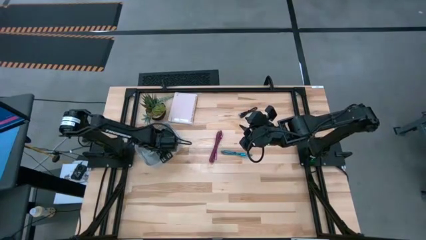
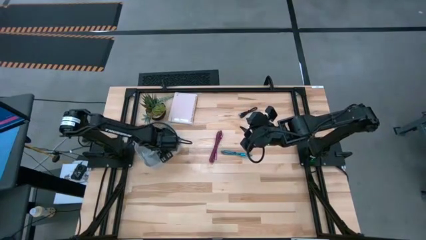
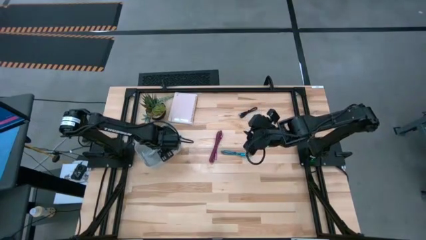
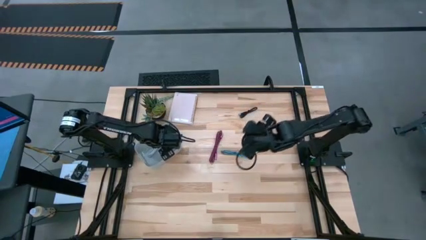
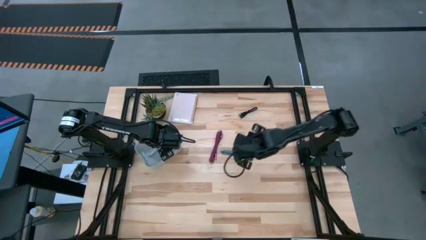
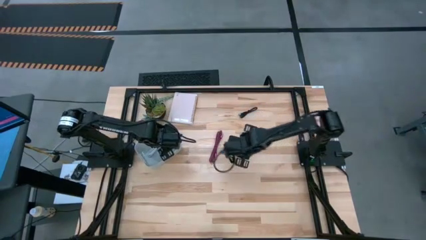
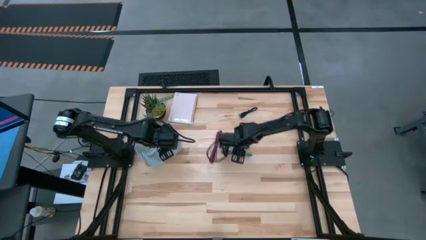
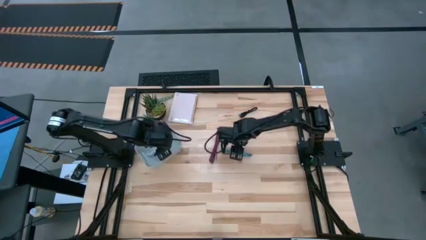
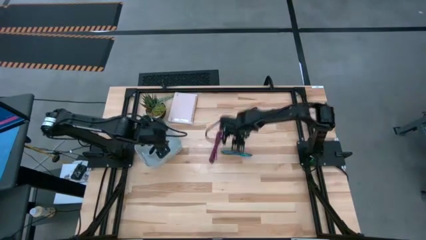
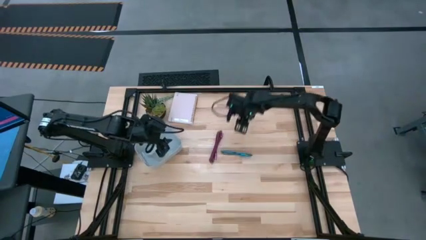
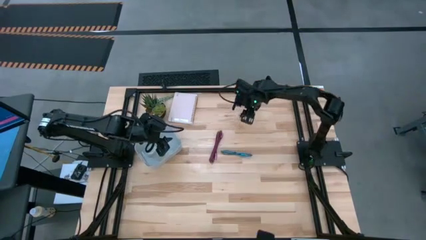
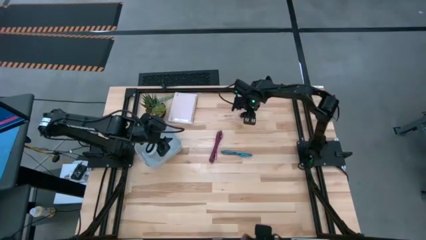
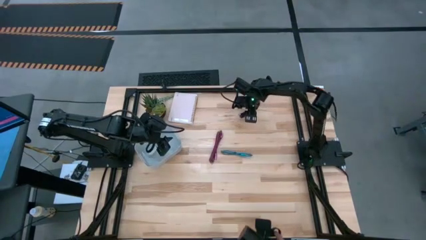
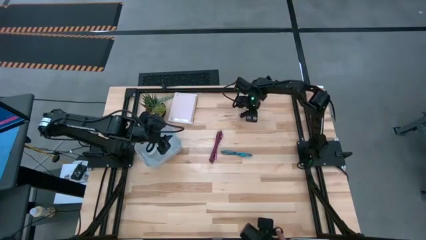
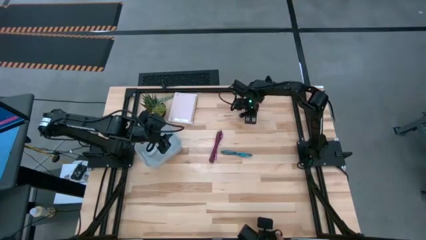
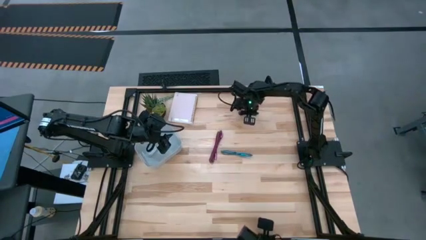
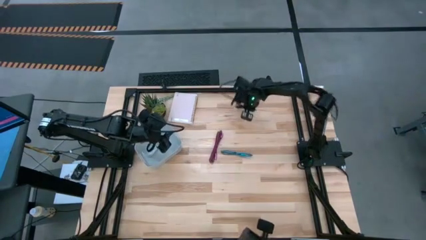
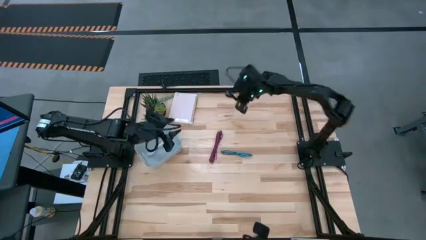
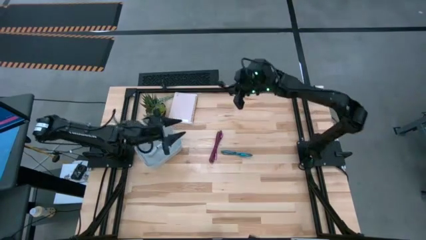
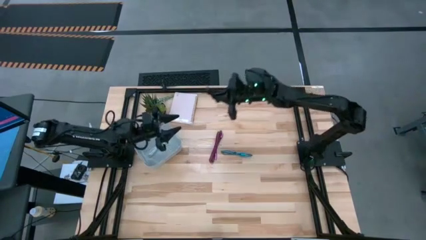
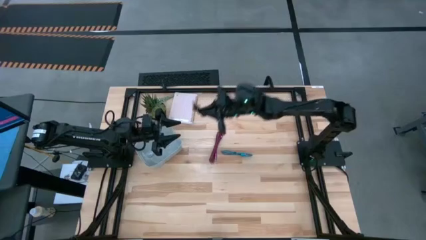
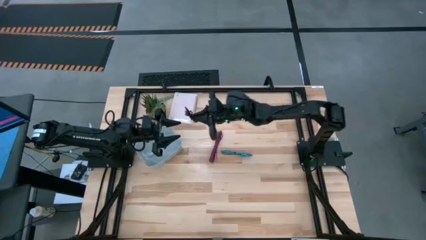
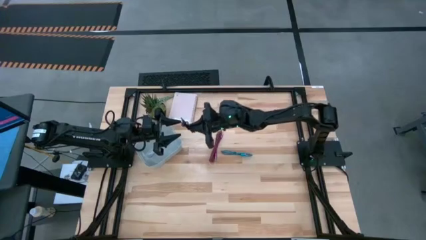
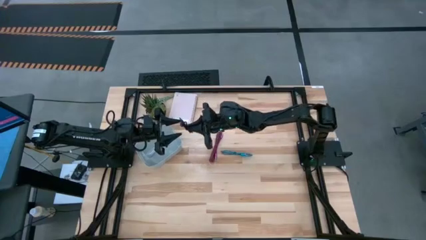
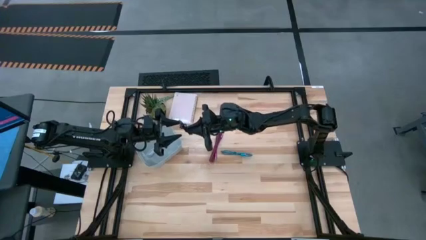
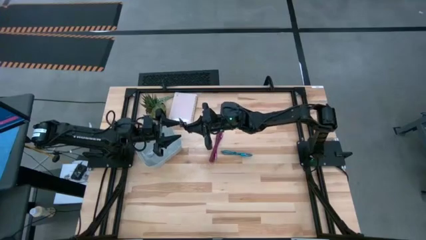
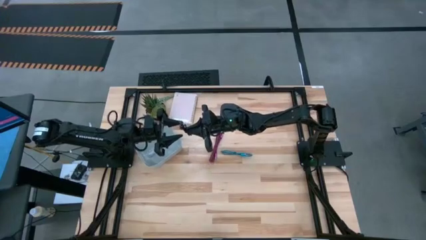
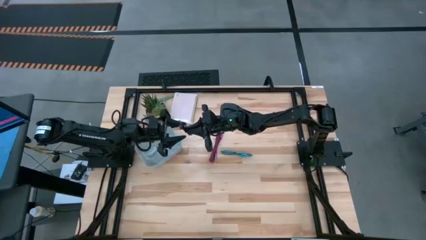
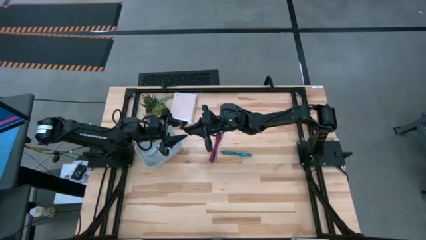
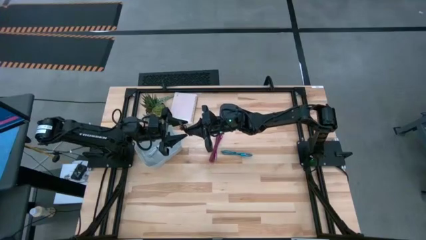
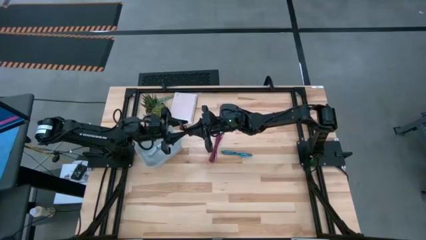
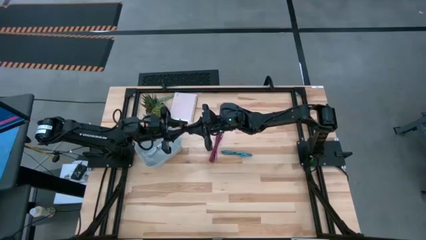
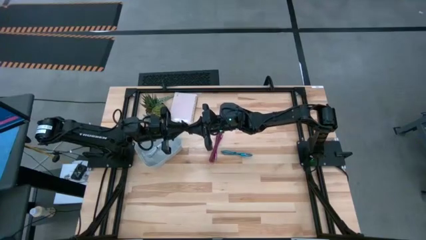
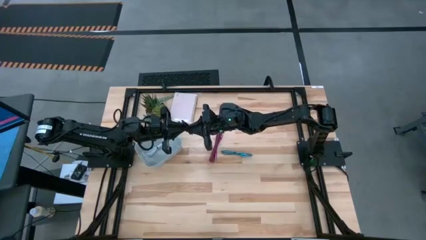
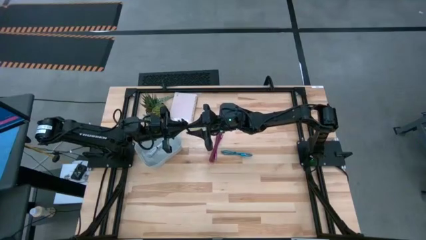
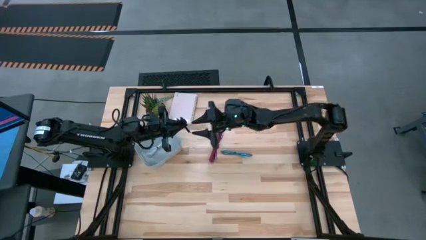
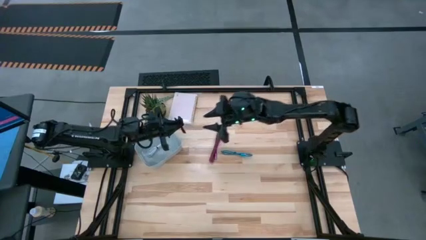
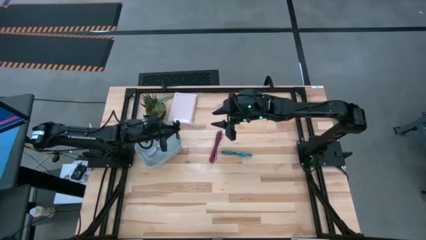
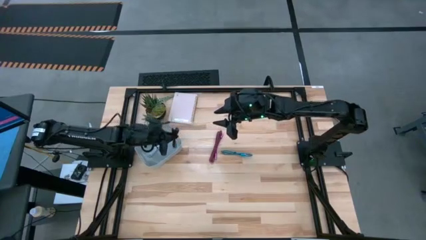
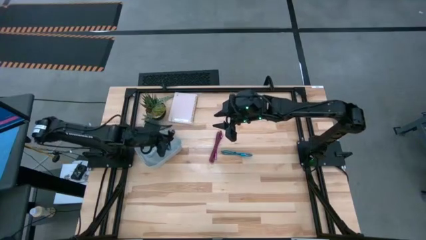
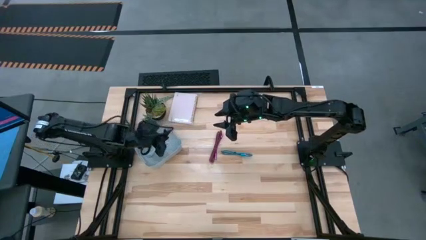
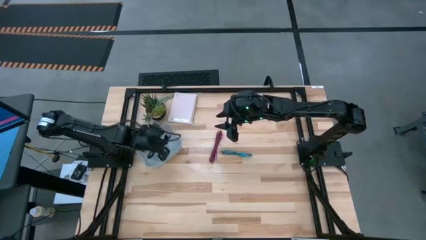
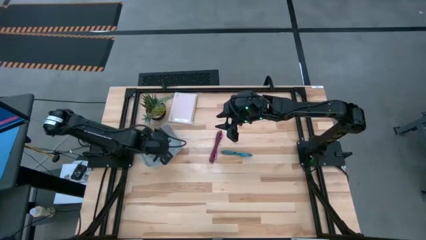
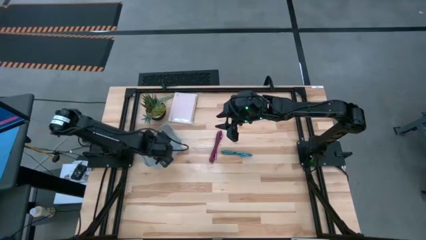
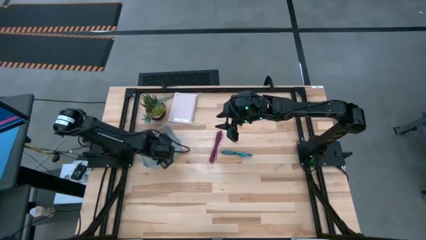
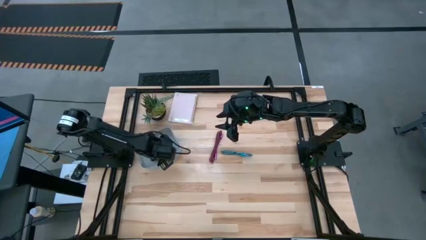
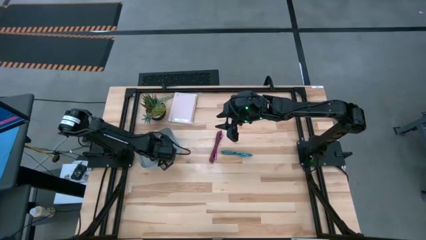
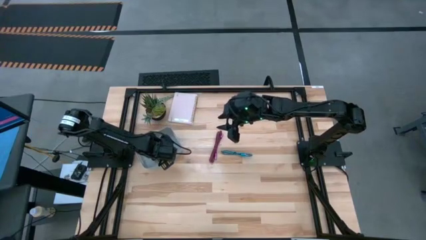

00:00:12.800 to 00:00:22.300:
Task: Pick and place USB-C Cables
Put the black USB cable into the gray bin

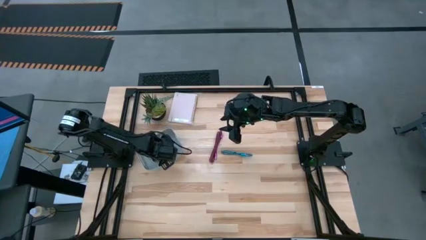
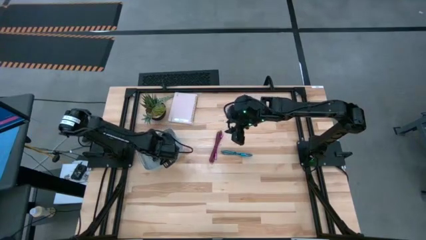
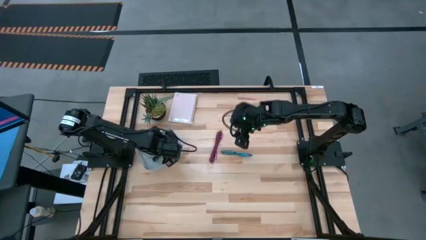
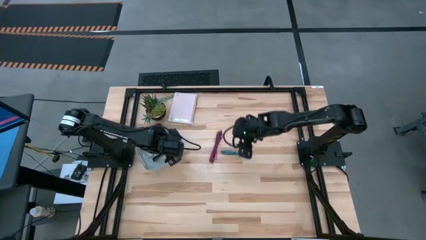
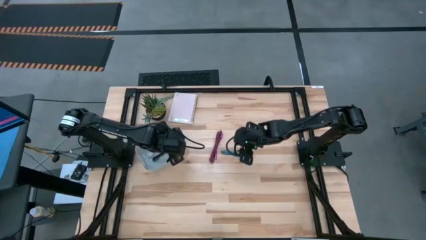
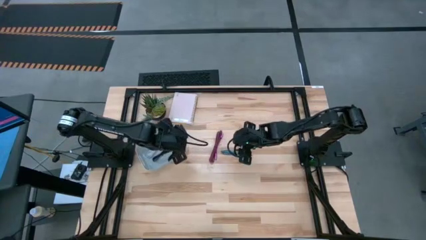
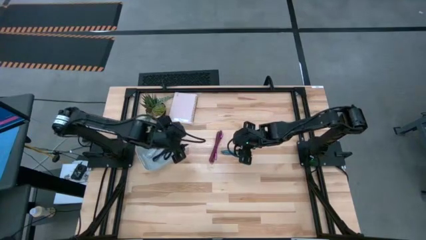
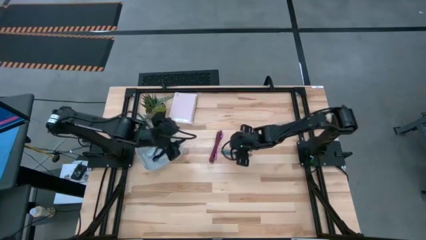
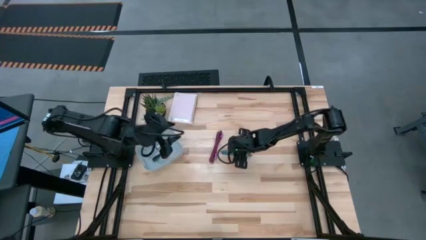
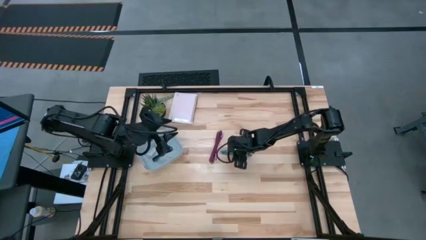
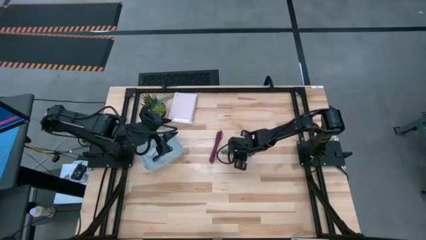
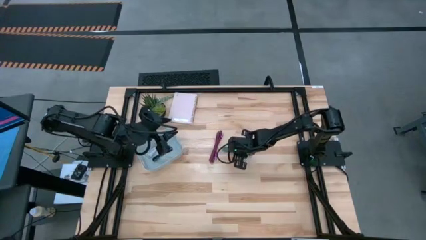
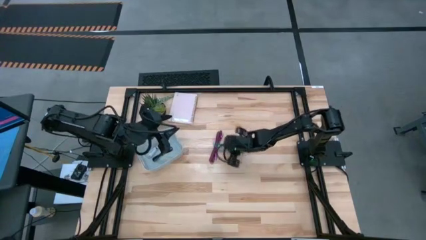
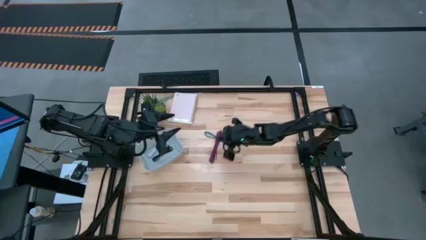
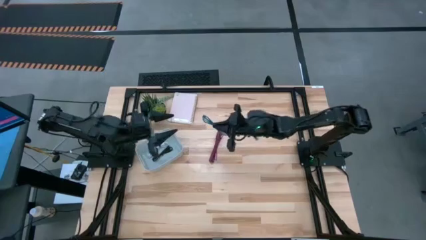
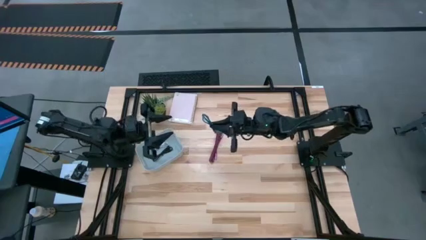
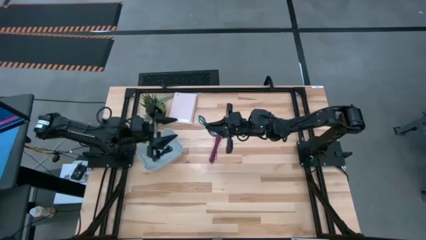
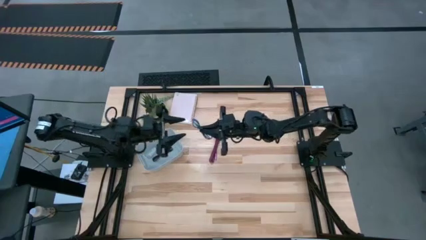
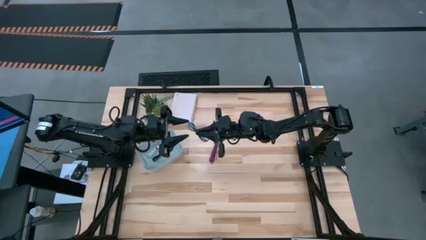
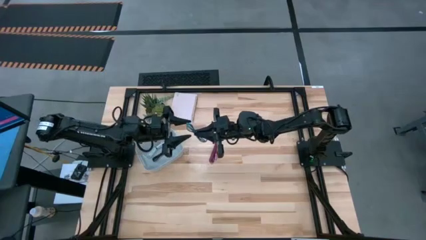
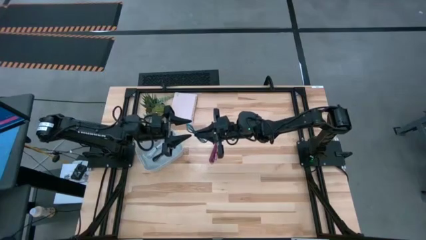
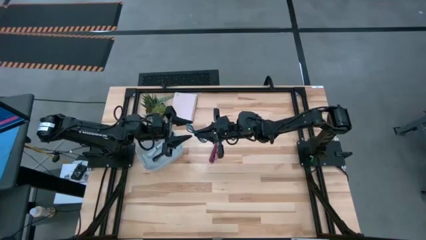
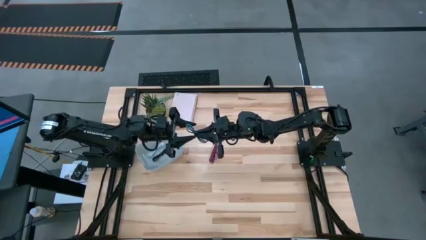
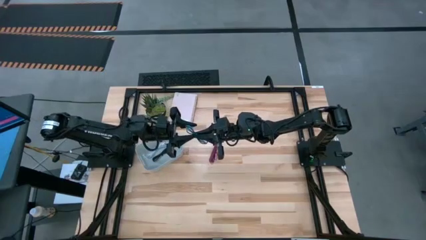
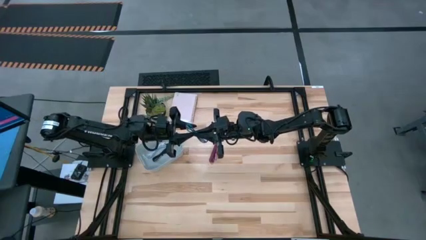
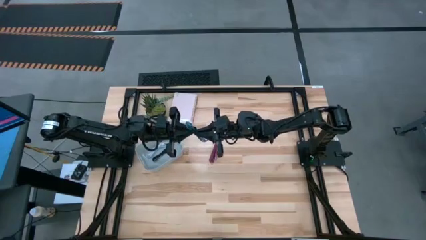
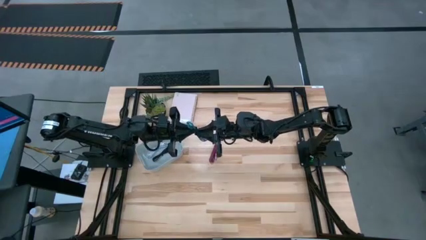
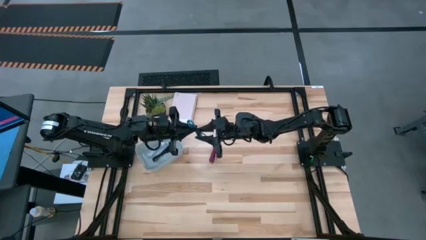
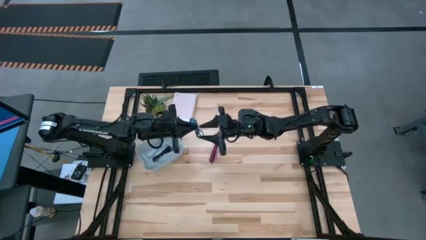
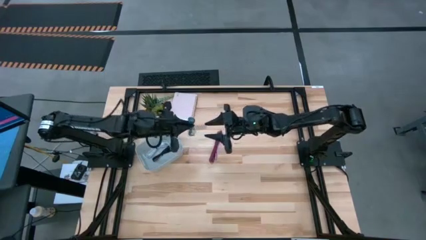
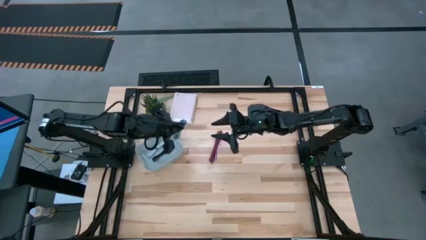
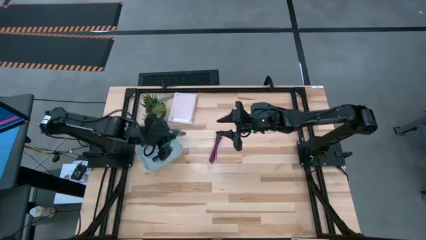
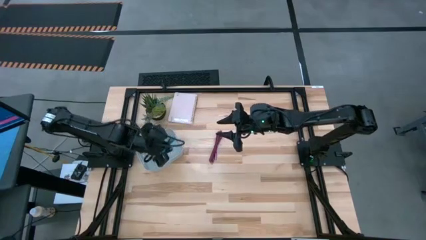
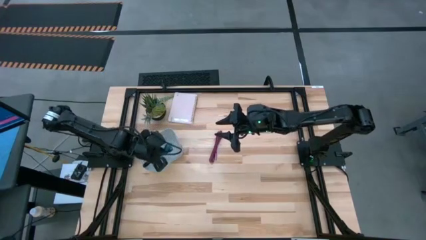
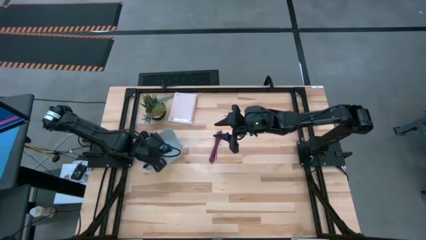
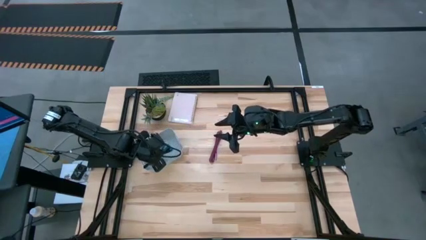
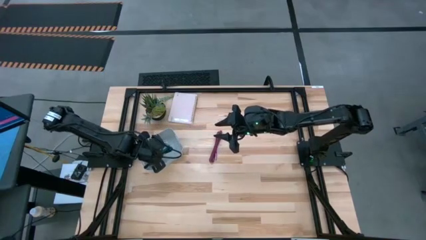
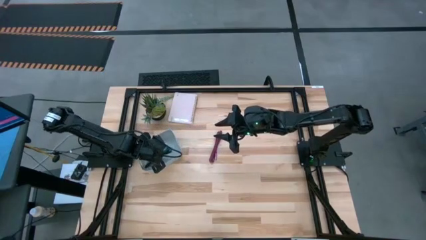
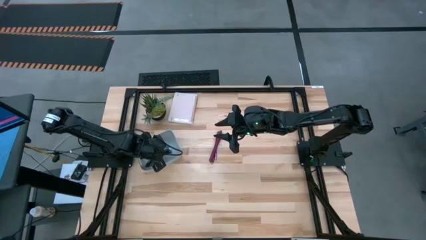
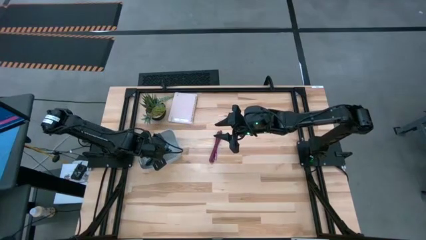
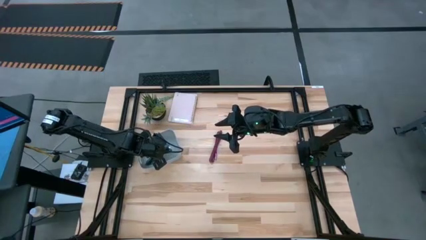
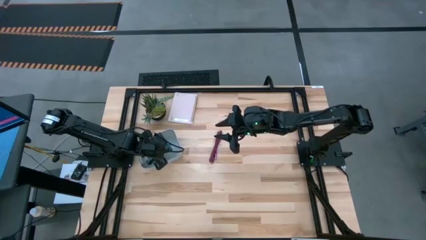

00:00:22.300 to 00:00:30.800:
Put the blue USB cable into the gray bin
